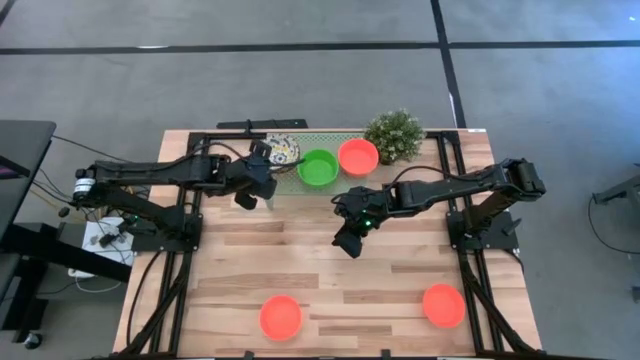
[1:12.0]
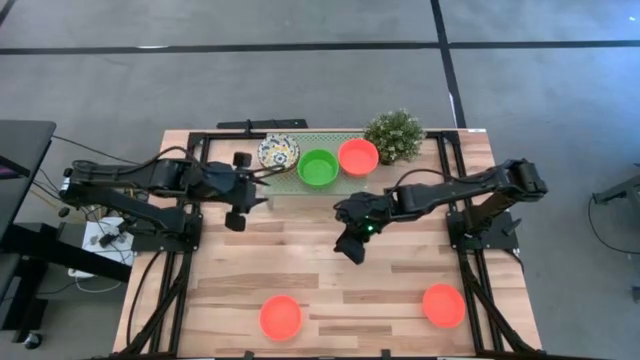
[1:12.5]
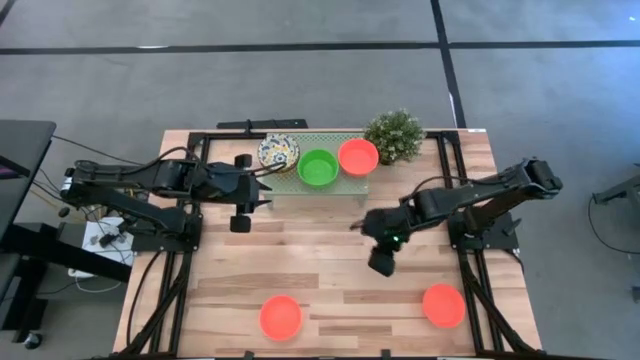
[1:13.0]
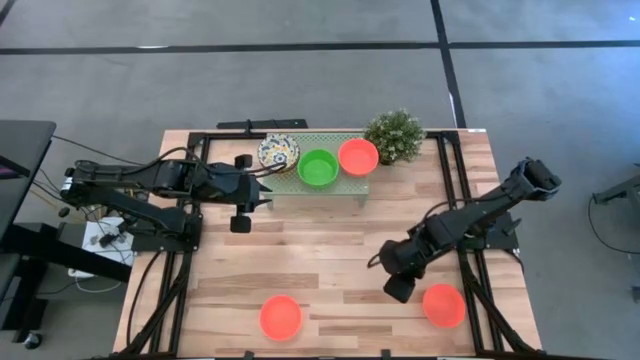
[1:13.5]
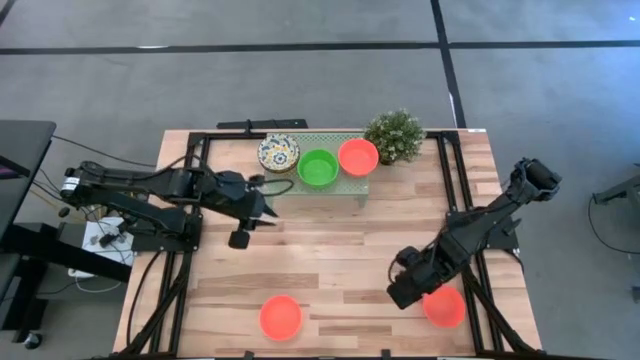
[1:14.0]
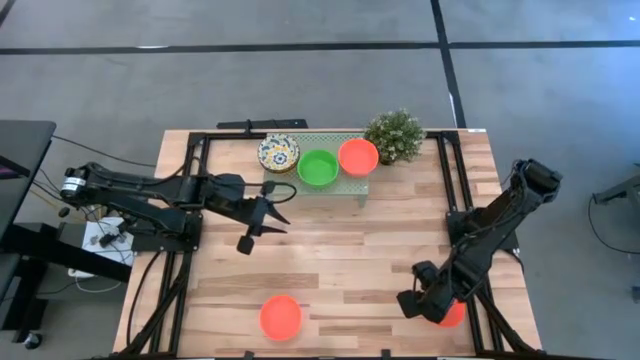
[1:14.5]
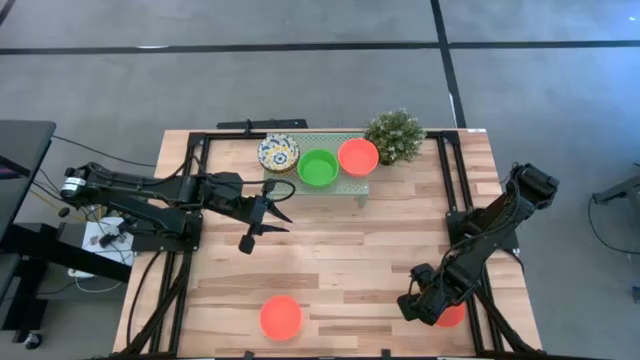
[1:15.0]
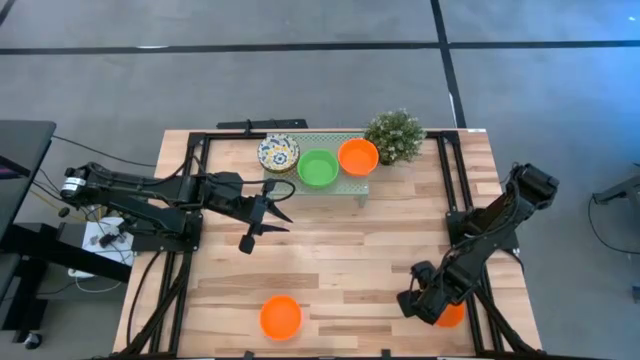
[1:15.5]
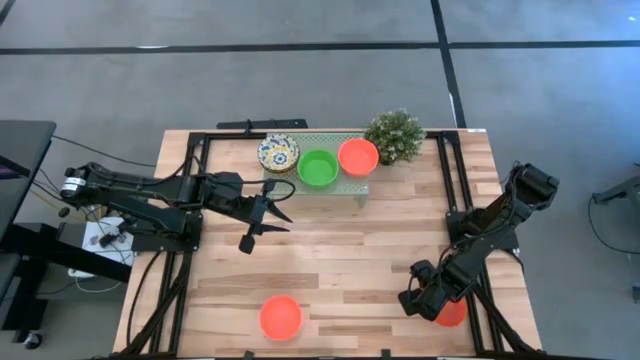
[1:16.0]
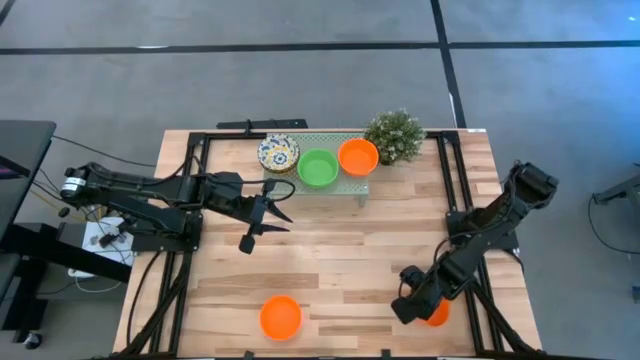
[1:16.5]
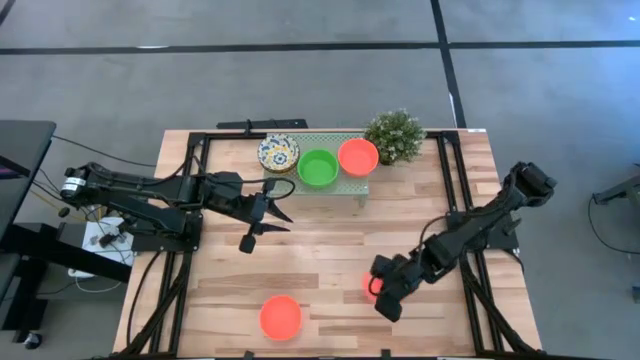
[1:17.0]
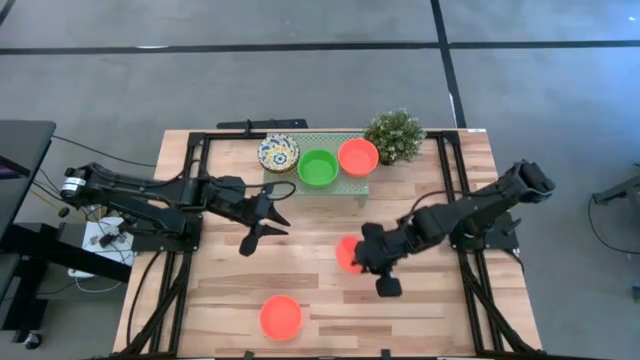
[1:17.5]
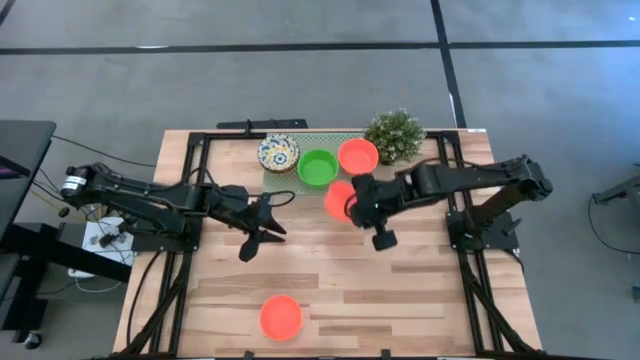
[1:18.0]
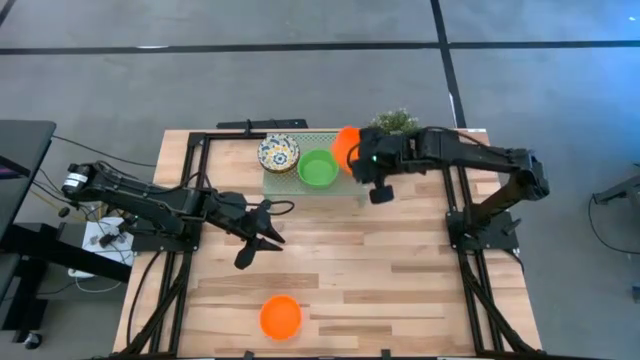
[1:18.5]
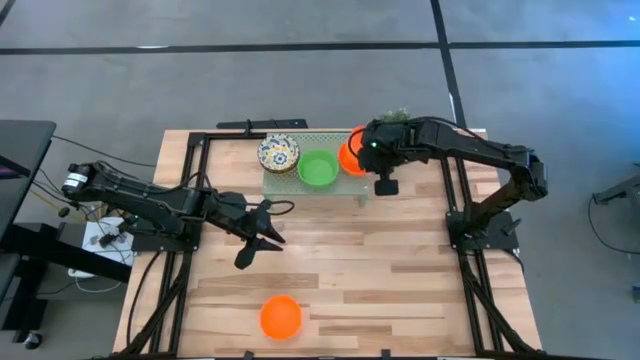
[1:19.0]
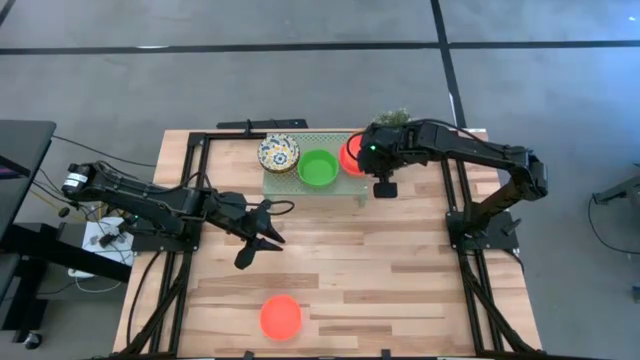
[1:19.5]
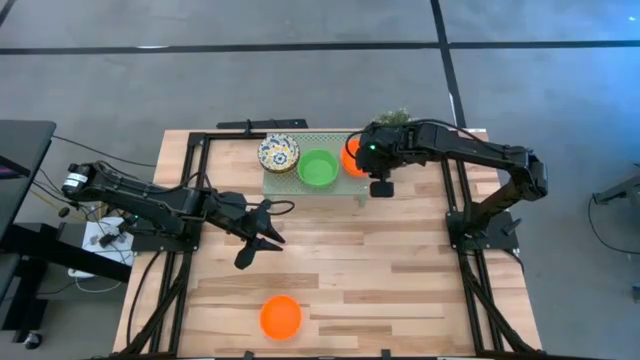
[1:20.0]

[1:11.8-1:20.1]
Task: Pick & Place Mini bowls
Stack the orange bowl on the orange bowls on the shelf

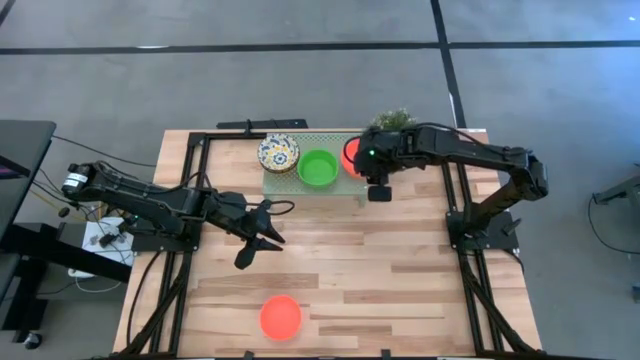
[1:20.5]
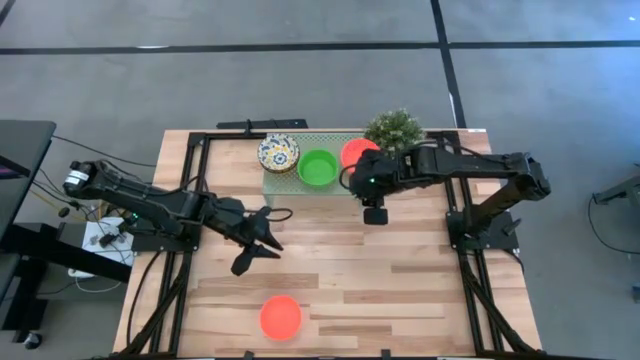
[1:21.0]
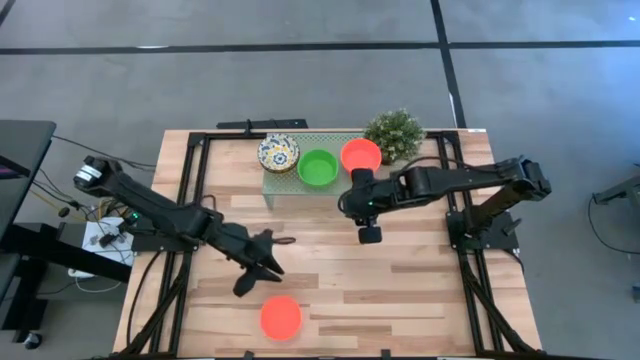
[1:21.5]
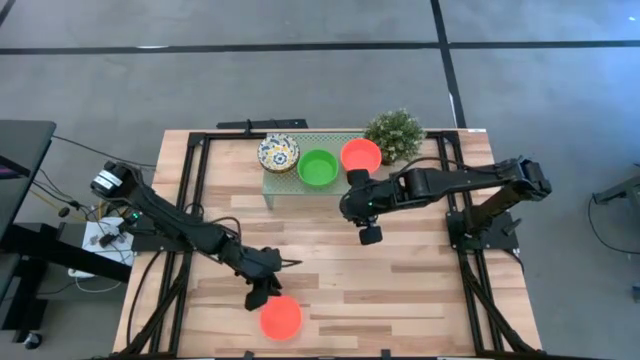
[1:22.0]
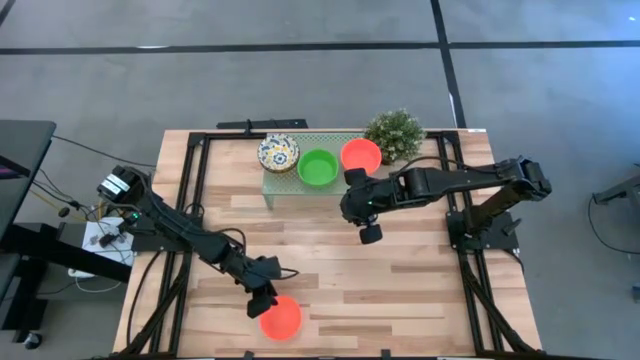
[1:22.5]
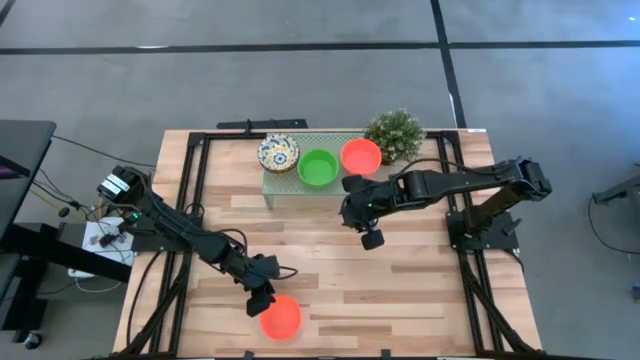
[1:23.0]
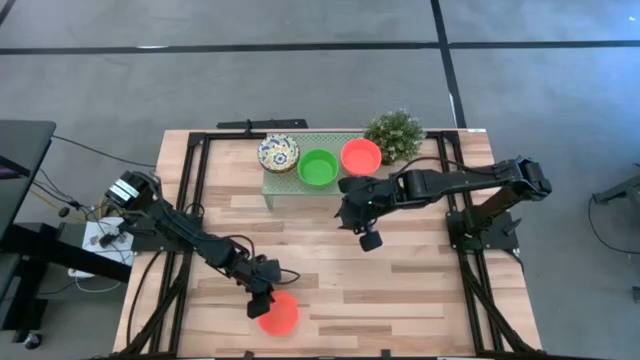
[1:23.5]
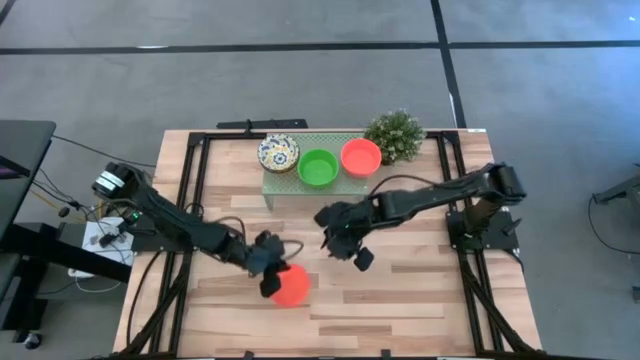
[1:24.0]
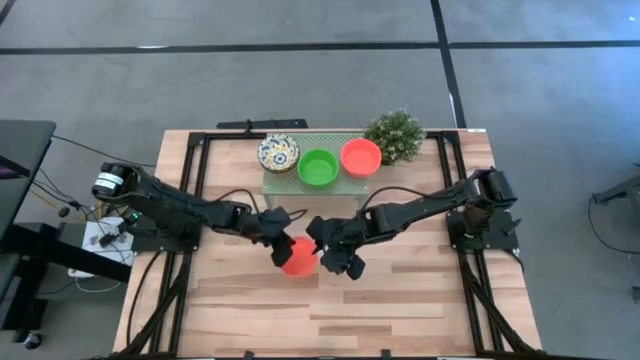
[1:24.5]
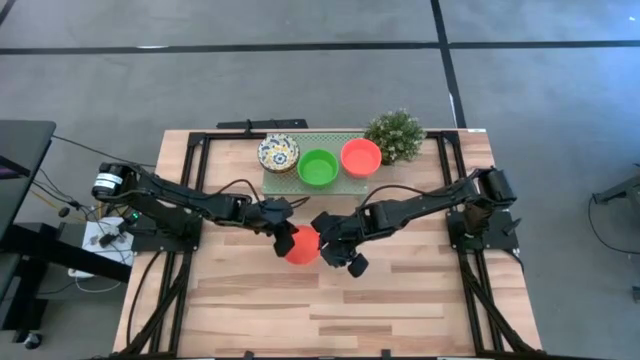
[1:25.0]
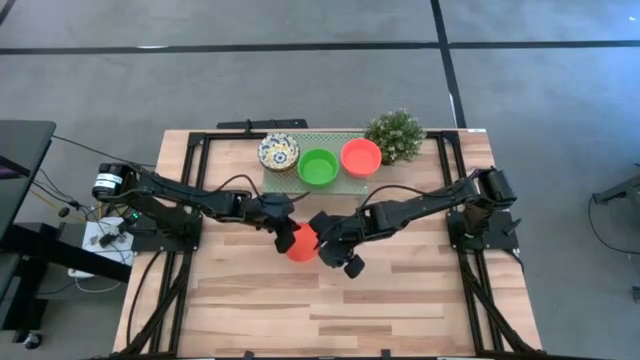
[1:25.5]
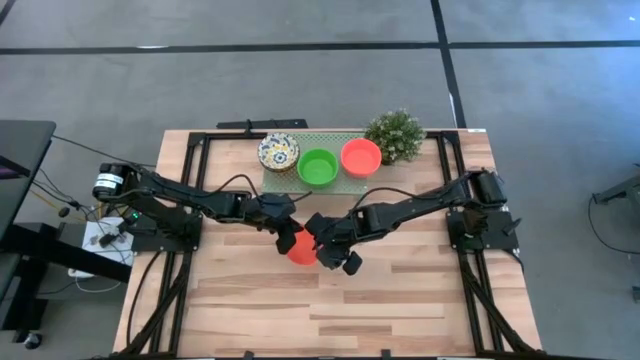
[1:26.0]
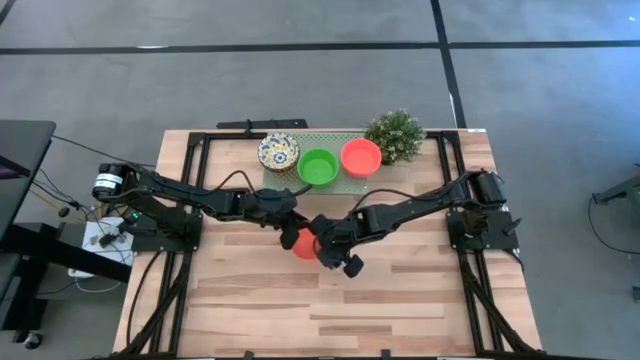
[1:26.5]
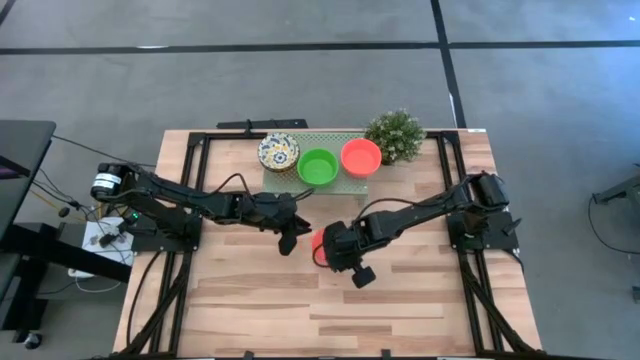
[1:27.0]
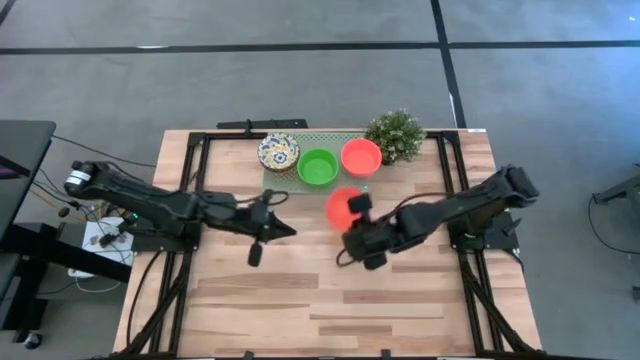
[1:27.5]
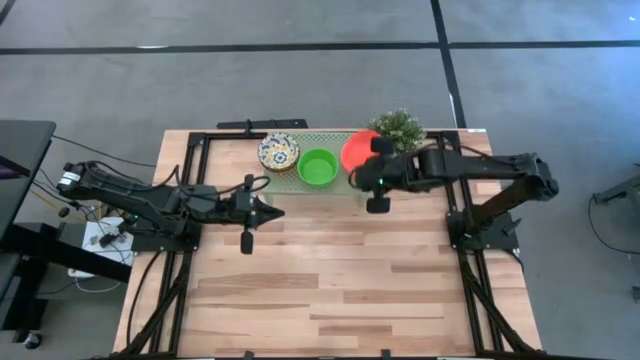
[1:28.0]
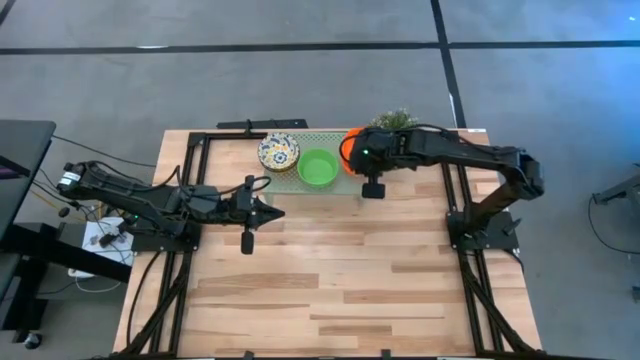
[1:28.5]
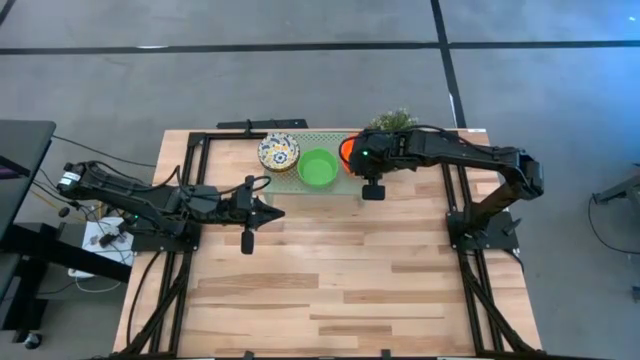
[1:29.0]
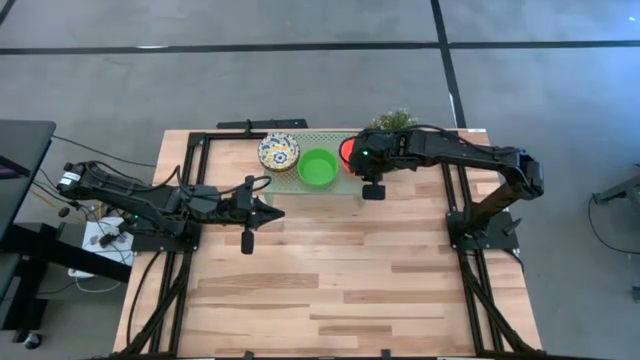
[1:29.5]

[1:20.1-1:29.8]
Stack the orange bowl on the orange bowls on the shelf

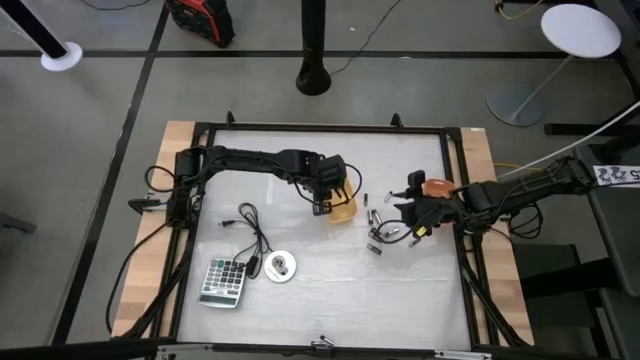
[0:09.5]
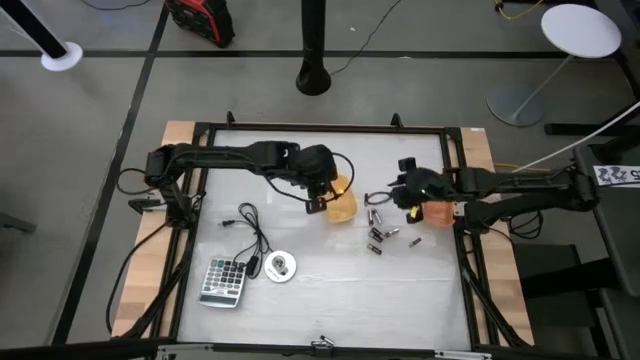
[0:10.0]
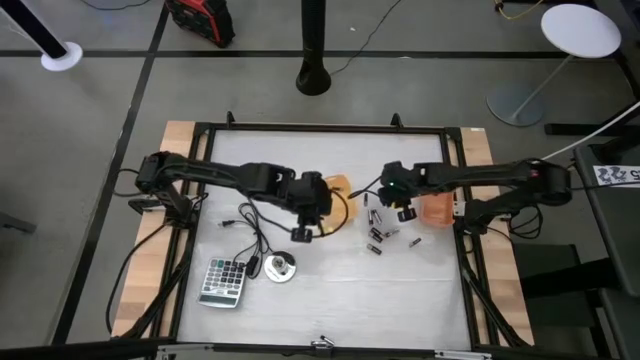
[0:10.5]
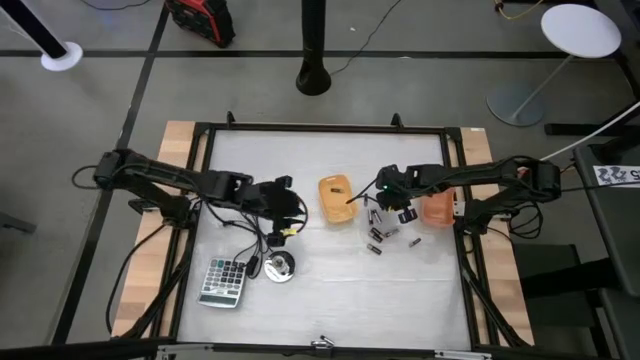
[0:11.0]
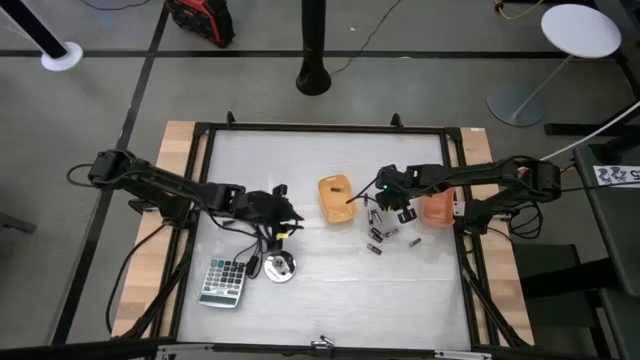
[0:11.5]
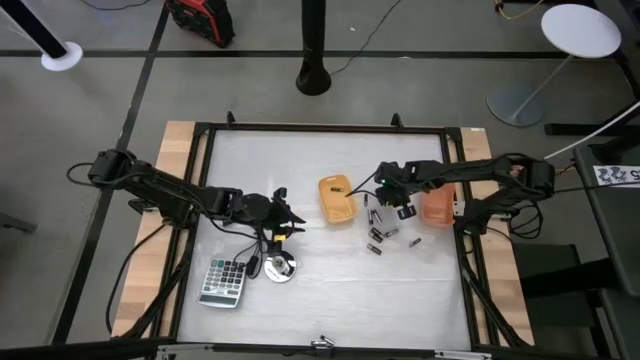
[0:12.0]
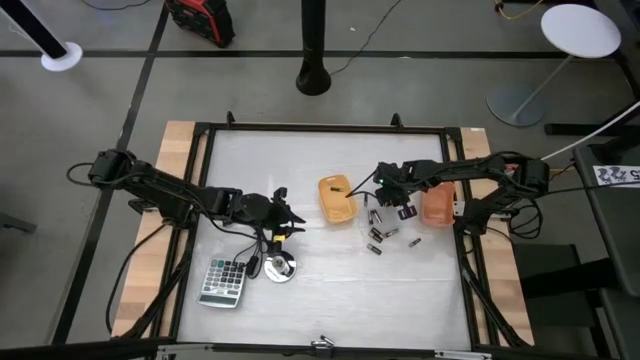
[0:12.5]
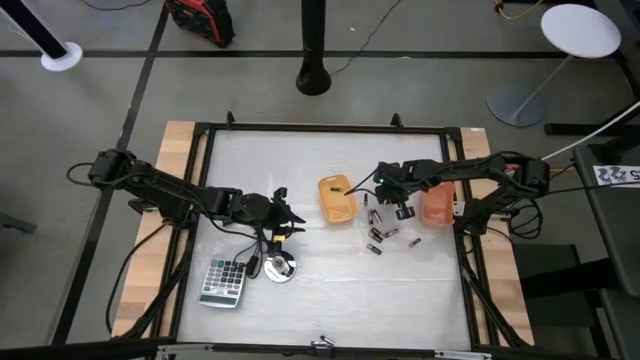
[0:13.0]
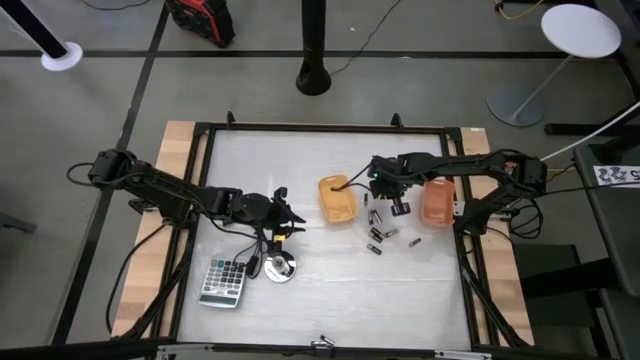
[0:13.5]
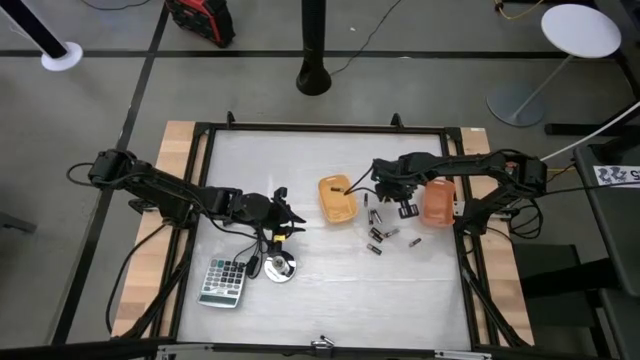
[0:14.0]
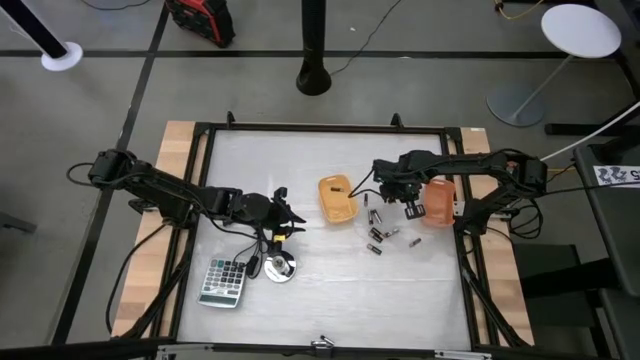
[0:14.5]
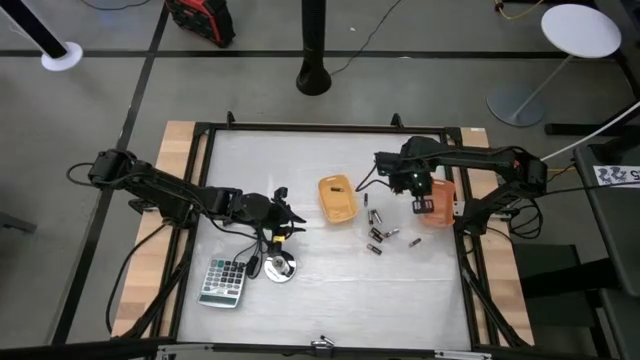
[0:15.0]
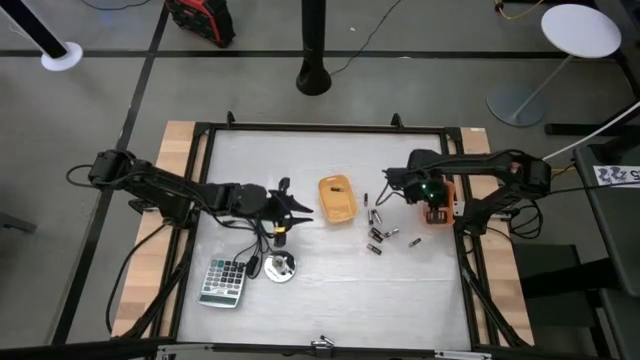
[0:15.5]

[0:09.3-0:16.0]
Task: Sort batteries
Put the silver battery into the orange bin
